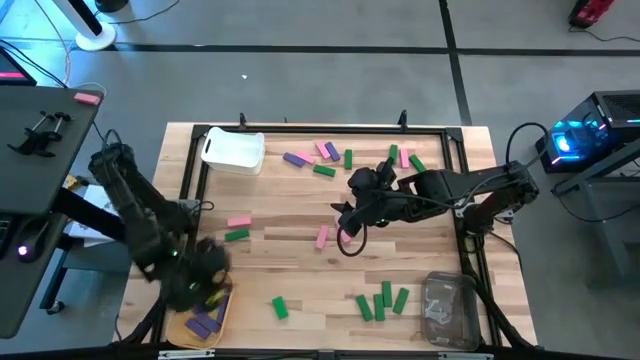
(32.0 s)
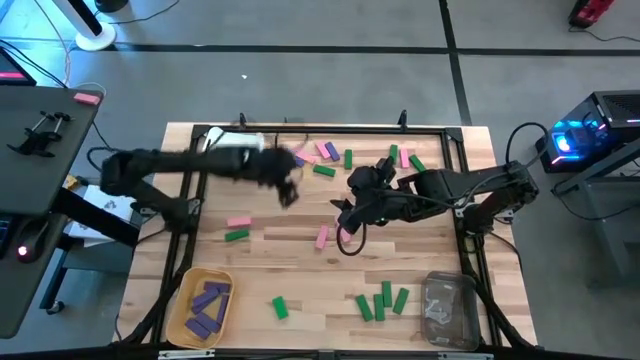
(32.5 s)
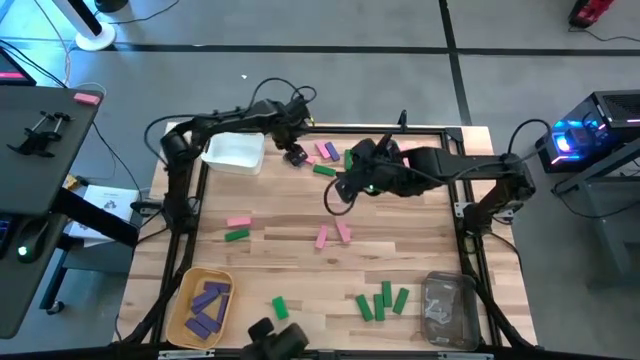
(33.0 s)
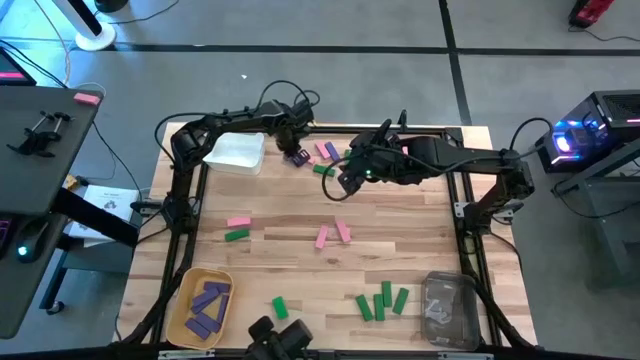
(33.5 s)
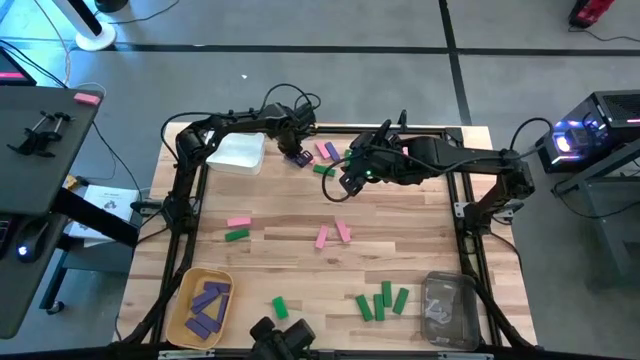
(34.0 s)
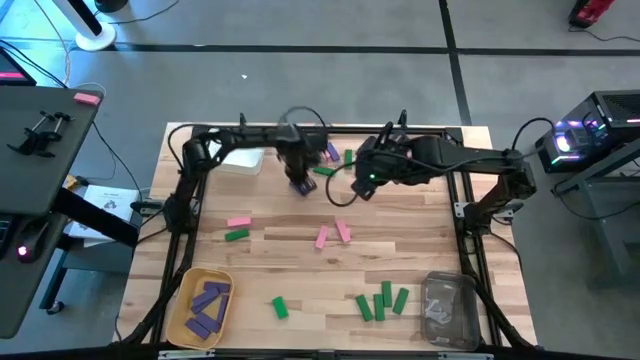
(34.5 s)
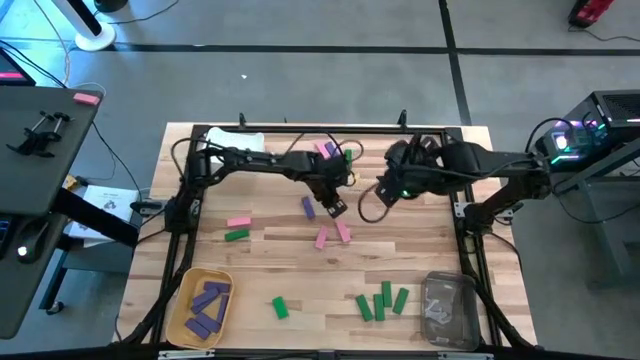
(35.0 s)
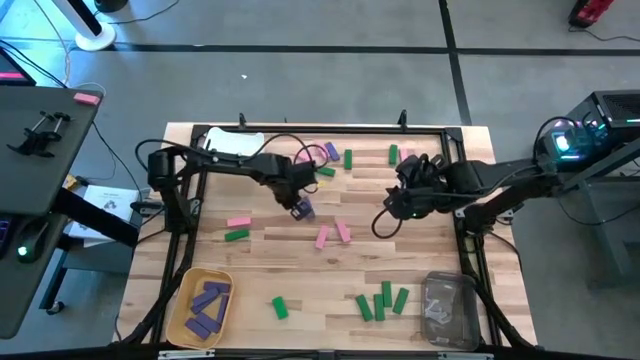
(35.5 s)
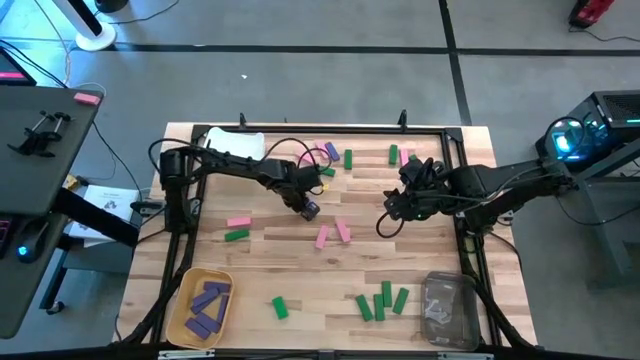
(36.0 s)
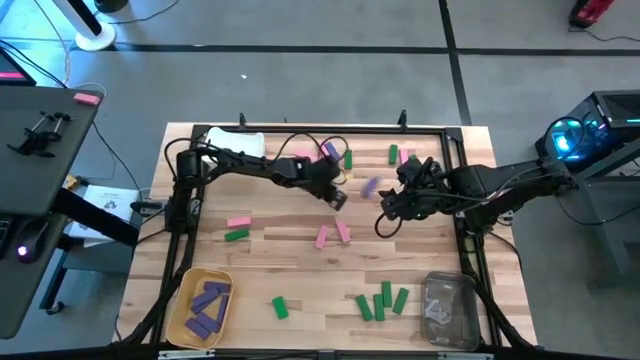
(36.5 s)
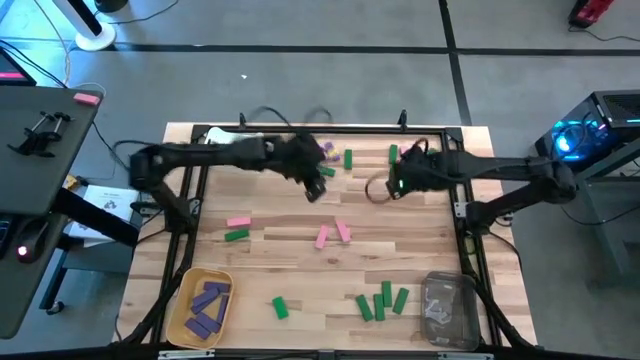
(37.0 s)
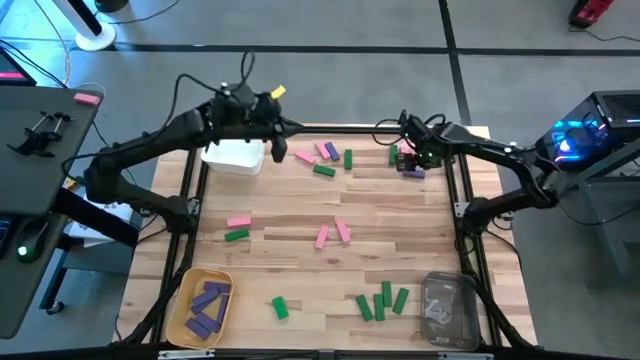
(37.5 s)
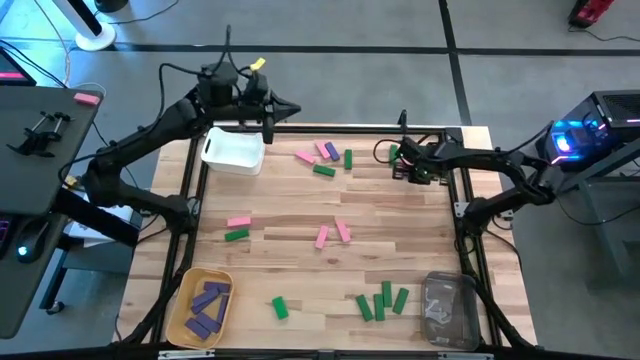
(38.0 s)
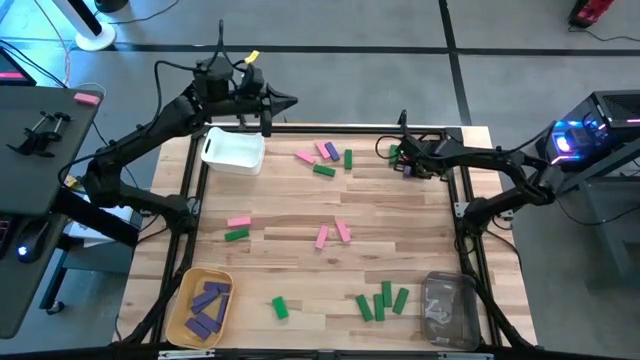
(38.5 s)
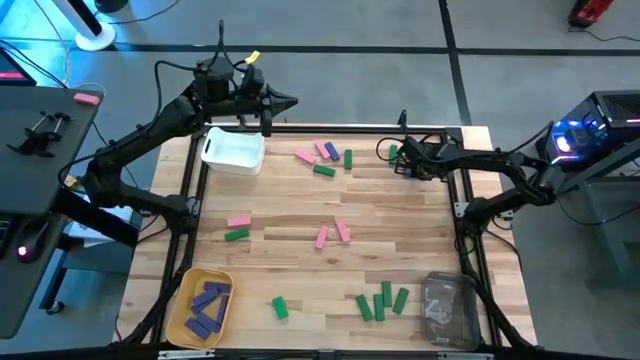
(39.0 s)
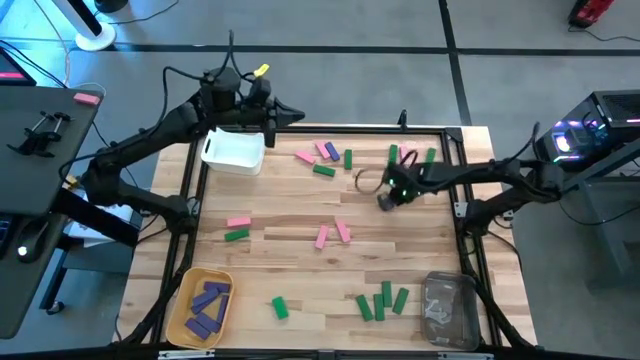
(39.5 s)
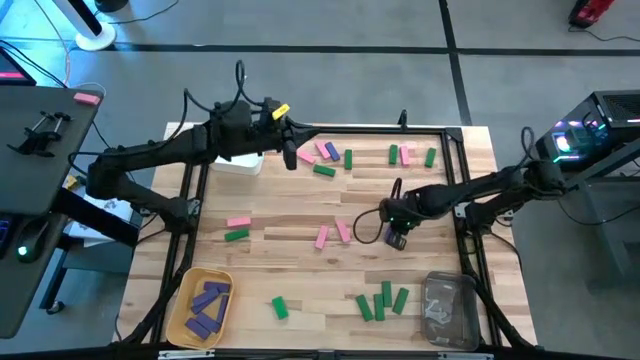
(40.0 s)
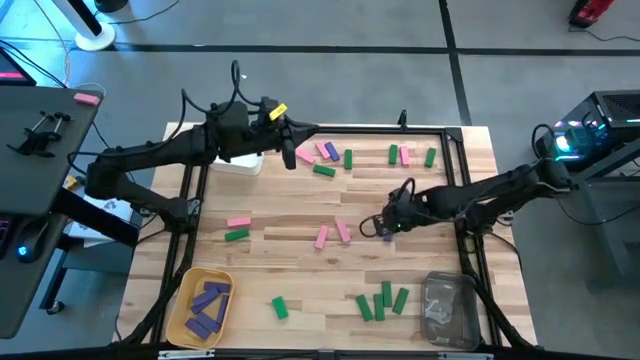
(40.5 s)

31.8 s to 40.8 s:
Task: Sort blocks
Put the violet block into the yellow bin

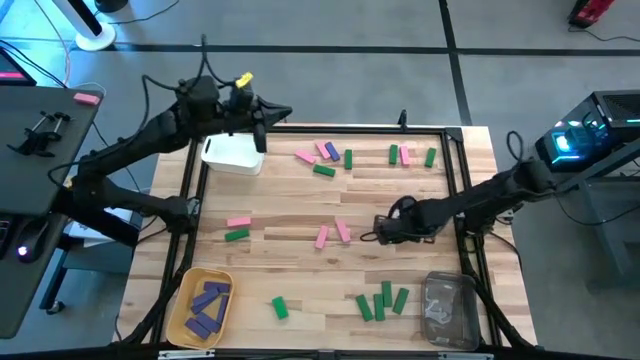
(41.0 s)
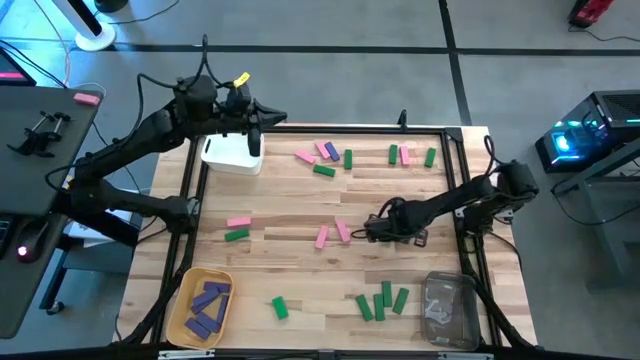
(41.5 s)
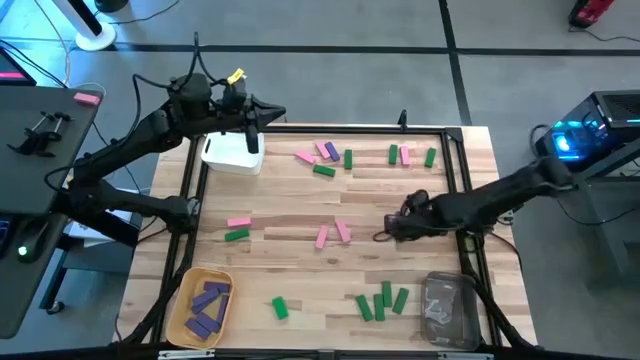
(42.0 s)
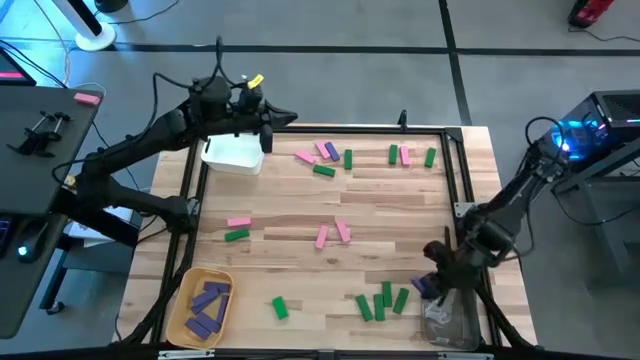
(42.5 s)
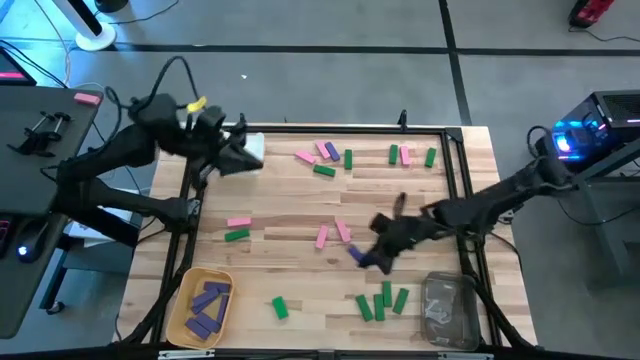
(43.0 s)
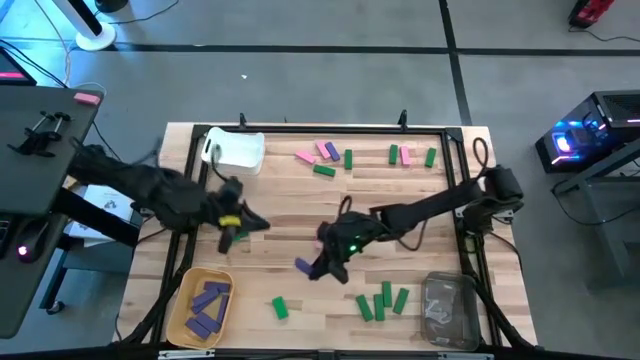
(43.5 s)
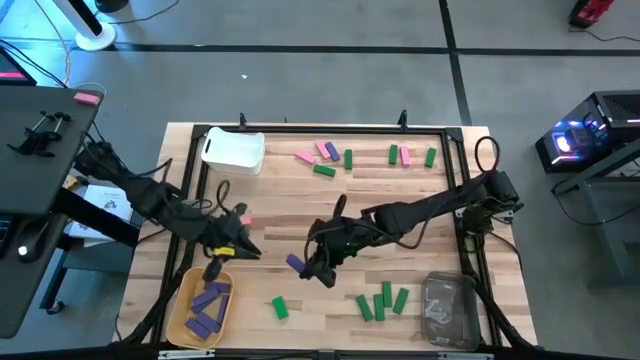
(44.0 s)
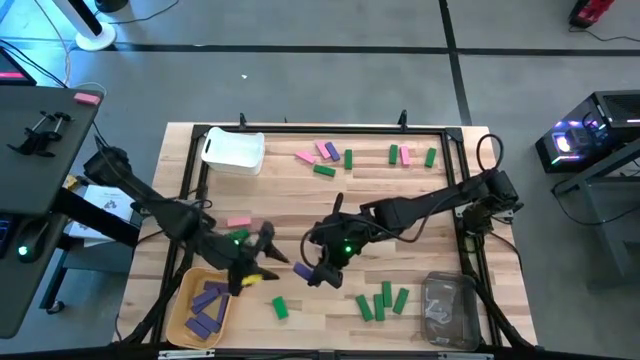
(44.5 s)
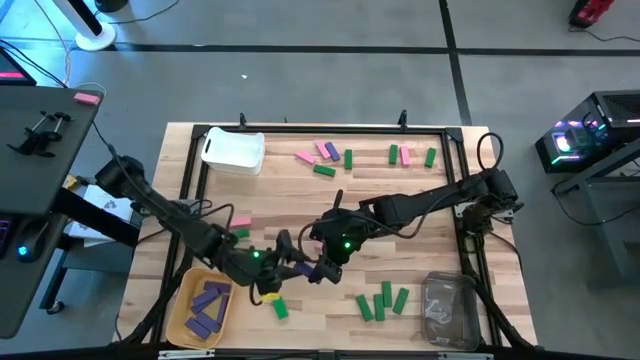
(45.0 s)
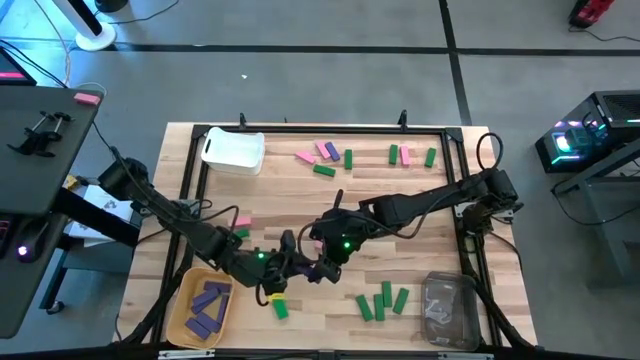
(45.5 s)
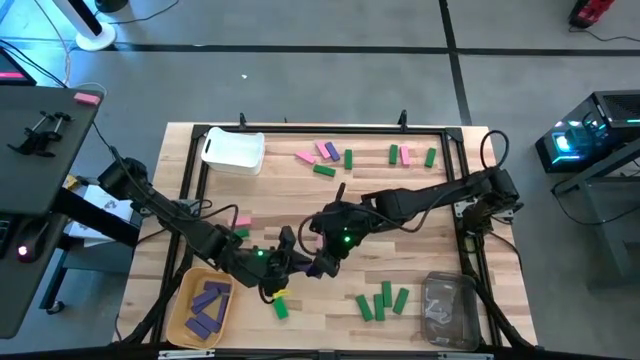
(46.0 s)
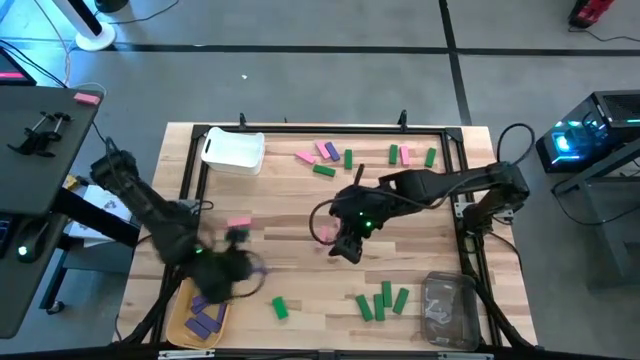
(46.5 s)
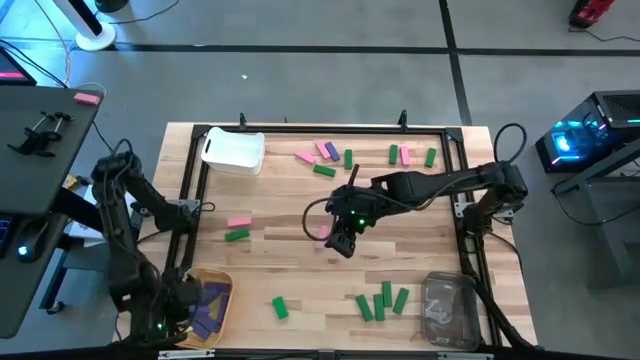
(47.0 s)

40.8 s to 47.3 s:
Put the violet block into the yellow bin

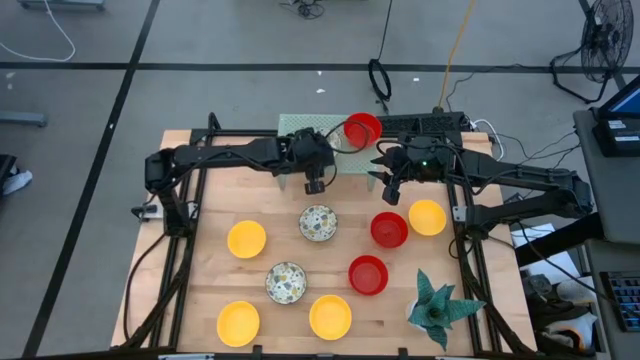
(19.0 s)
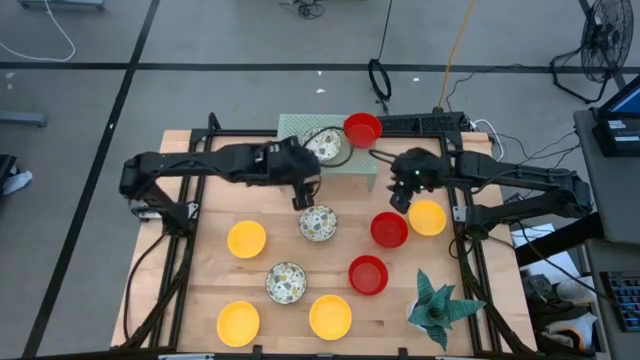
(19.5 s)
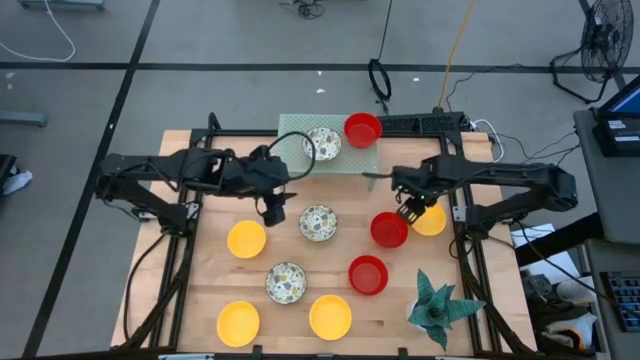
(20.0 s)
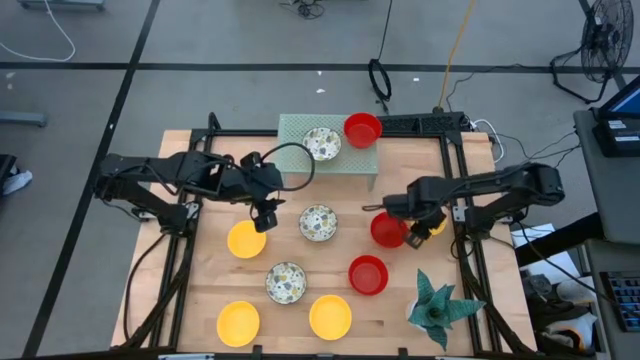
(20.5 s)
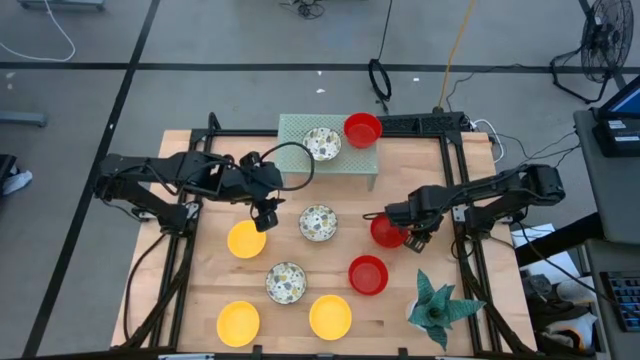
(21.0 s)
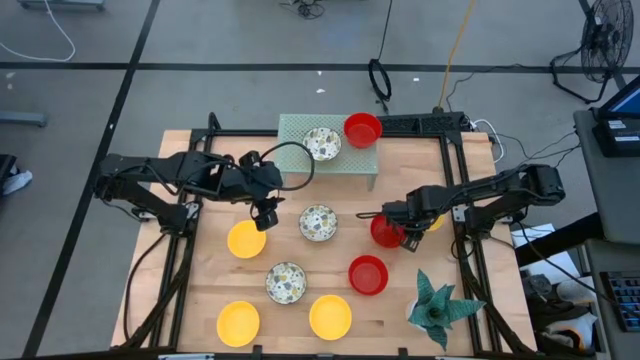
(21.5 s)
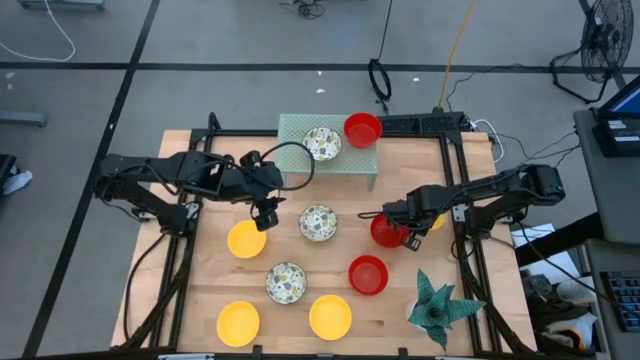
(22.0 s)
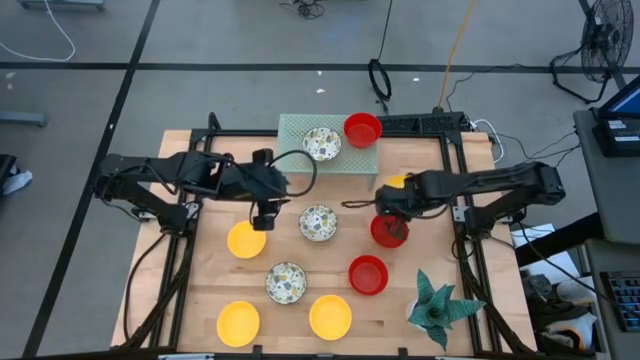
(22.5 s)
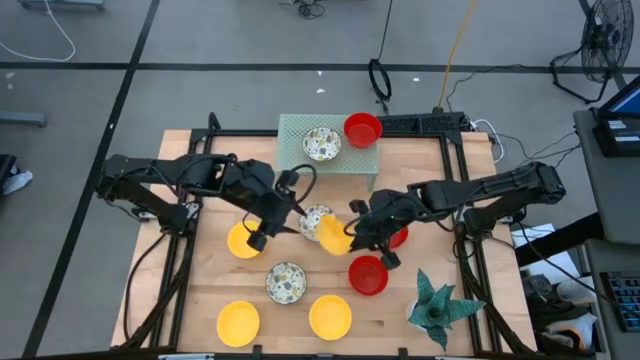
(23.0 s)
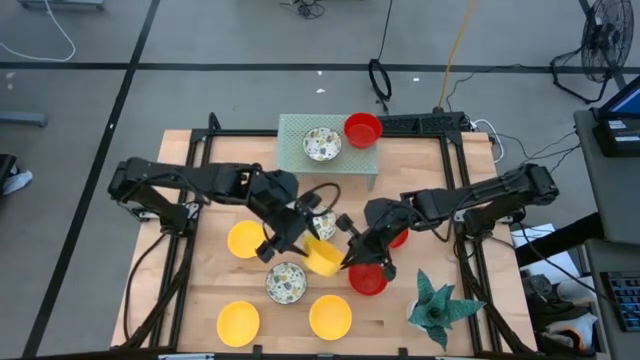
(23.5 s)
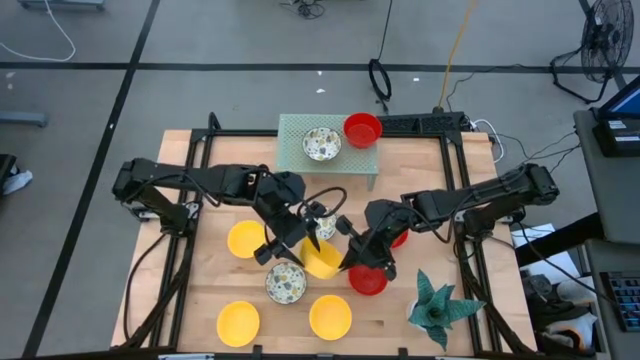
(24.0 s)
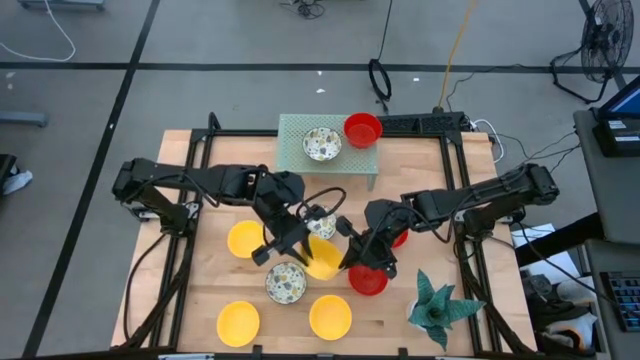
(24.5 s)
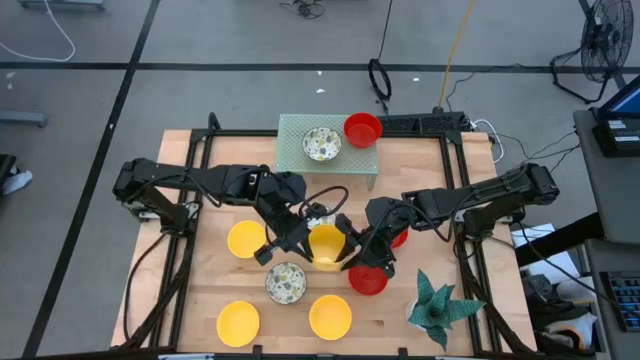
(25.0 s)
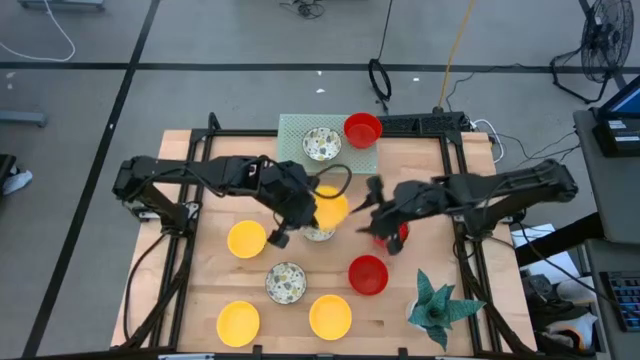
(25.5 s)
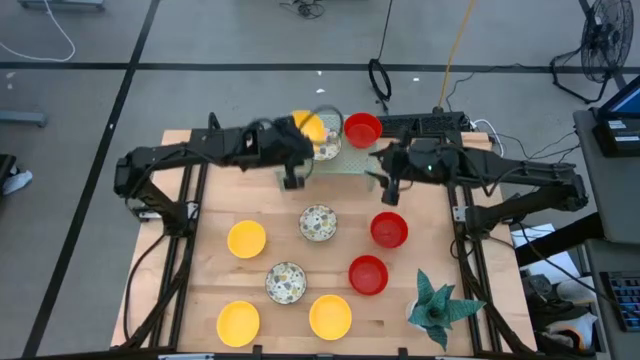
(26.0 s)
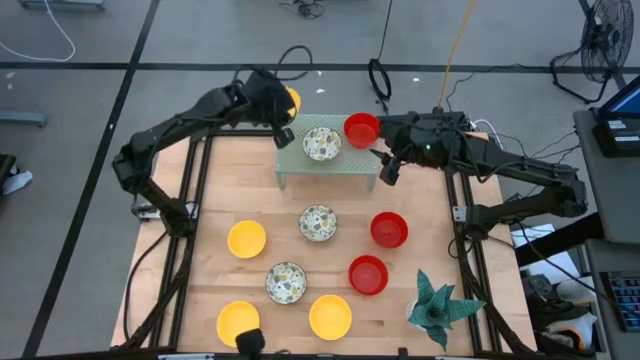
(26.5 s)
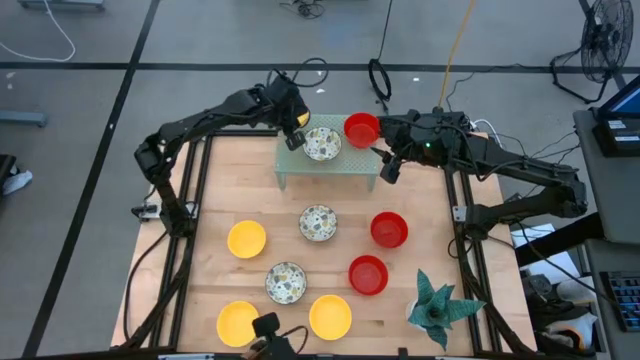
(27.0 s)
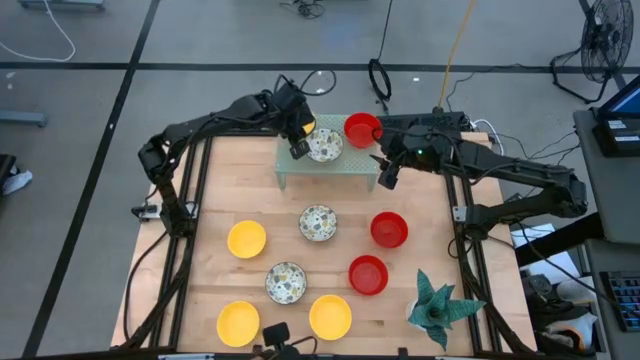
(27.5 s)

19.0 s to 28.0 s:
Task: Pick & Place Mini bowls
Put the yellow bowl on the shelf
